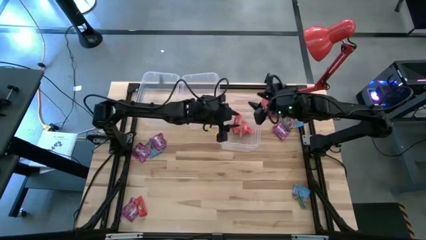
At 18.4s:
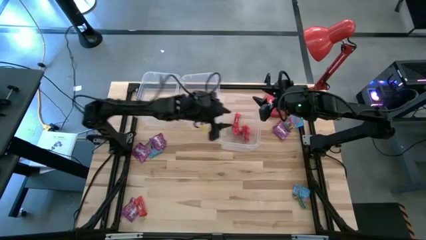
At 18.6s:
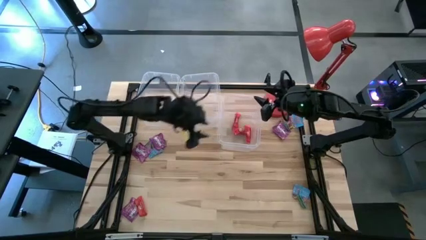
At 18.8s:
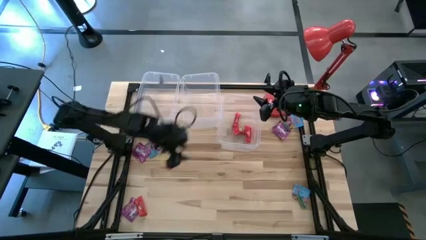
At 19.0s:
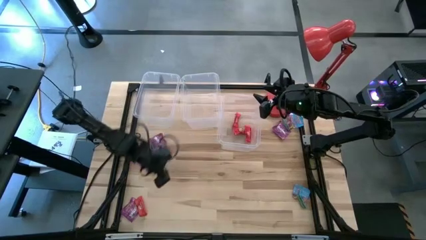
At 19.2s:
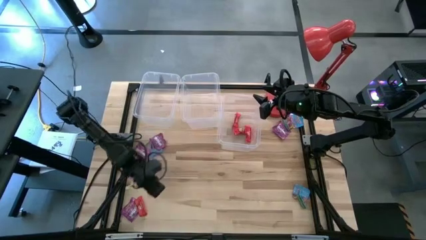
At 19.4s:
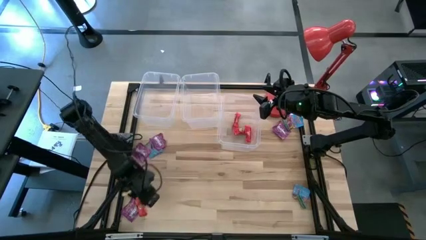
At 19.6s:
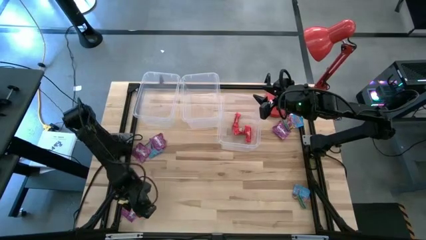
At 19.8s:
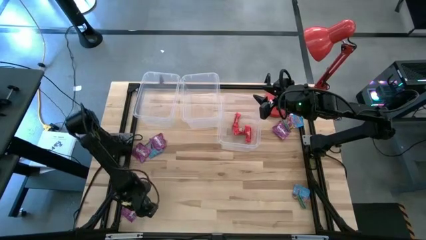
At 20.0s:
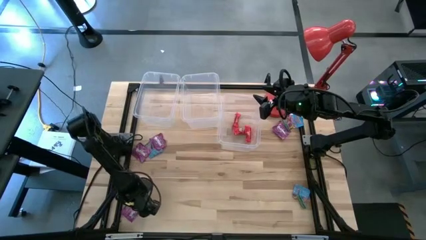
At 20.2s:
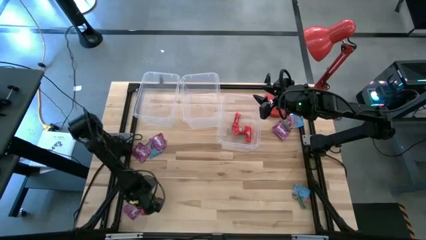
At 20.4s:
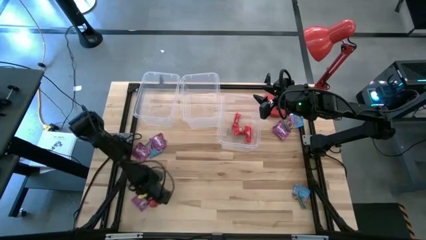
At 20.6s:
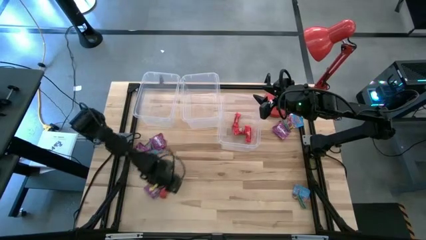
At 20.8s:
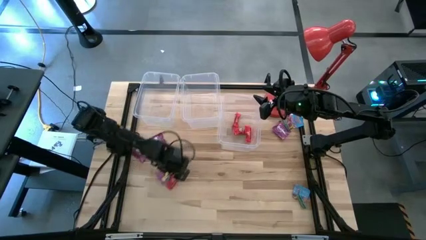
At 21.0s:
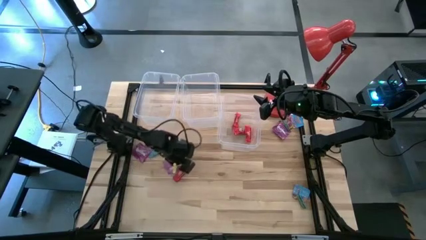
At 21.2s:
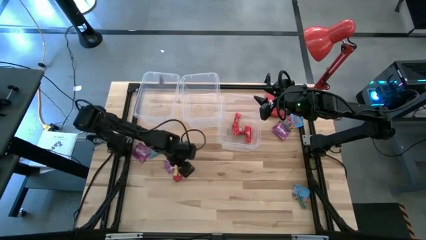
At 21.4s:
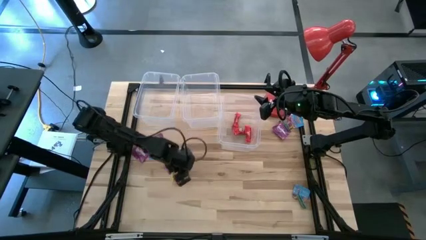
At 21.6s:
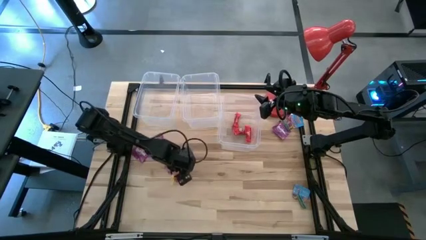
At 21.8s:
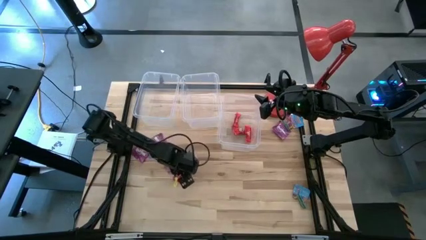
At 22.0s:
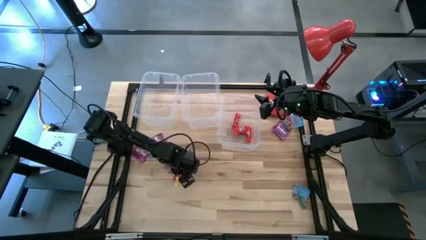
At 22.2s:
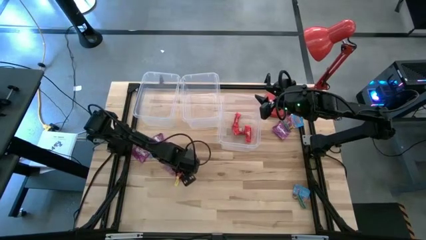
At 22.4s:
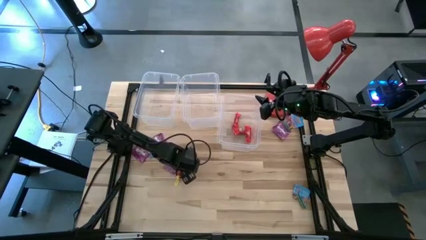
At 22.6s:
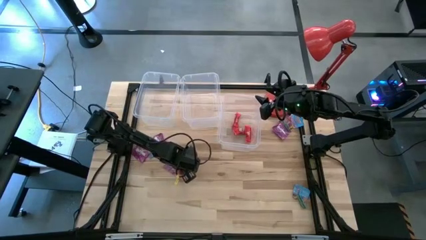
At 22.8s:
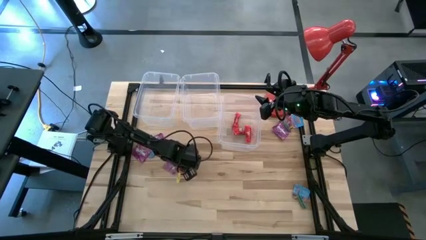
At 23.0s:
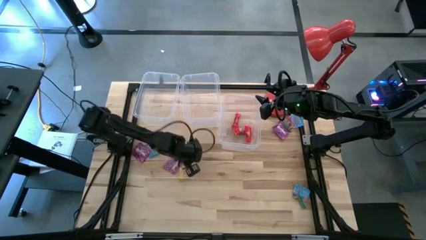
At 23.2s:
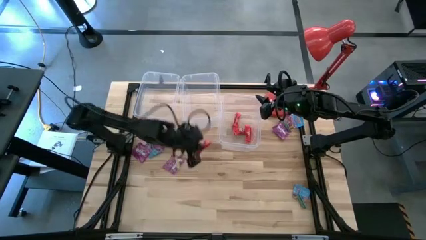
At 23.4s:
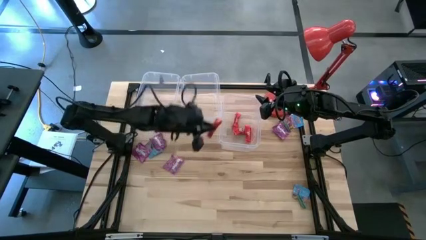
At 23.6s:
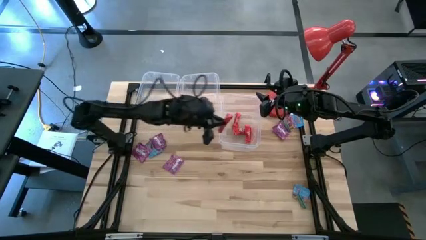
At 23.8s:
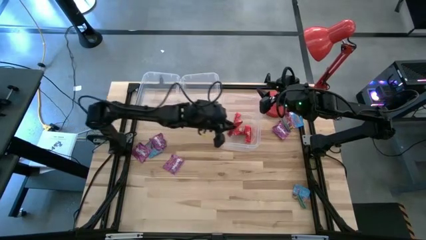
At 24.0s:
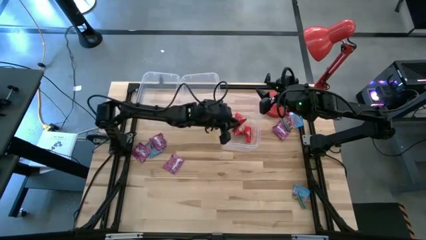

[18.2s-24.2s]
Task: Sort candy
Put the red candy into the top right transparent bin

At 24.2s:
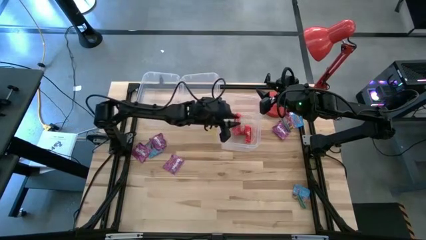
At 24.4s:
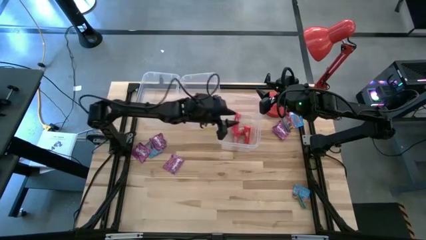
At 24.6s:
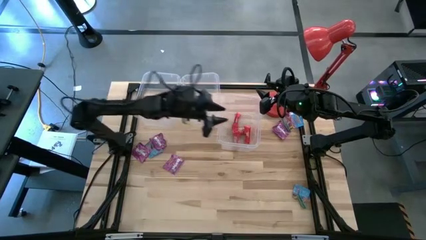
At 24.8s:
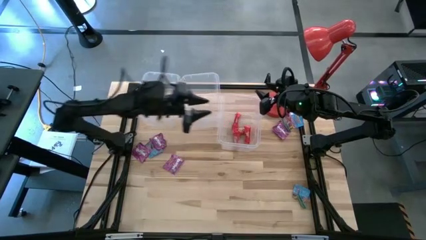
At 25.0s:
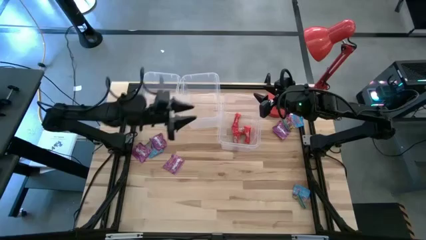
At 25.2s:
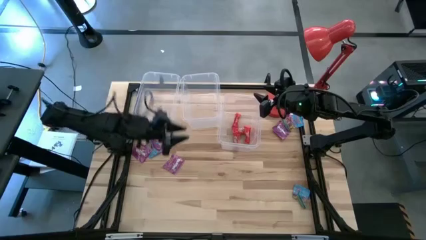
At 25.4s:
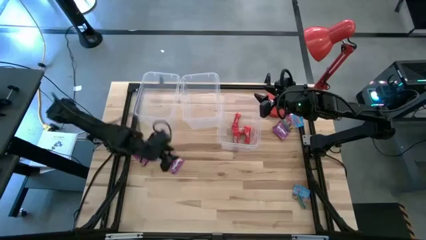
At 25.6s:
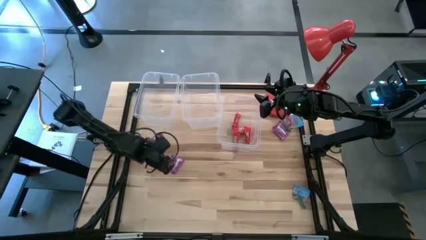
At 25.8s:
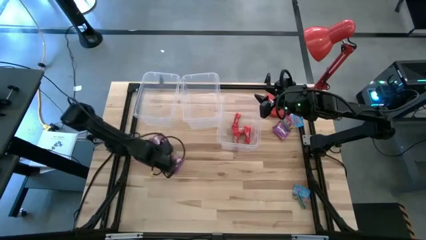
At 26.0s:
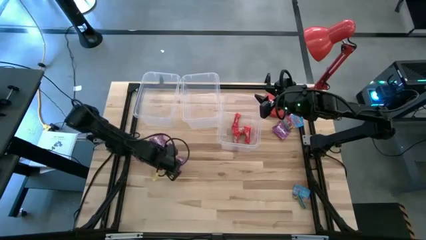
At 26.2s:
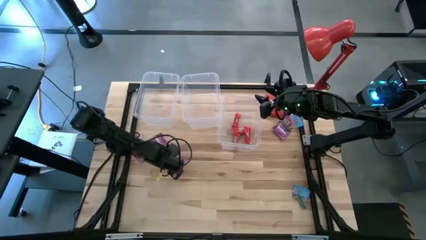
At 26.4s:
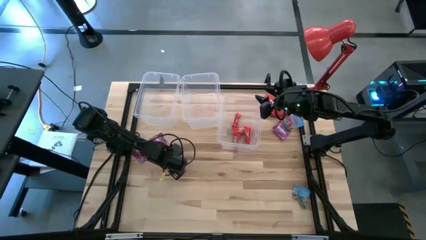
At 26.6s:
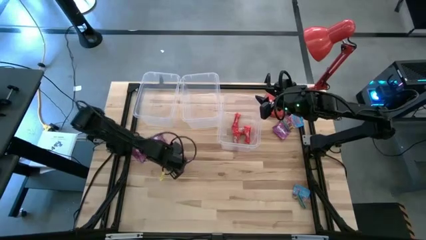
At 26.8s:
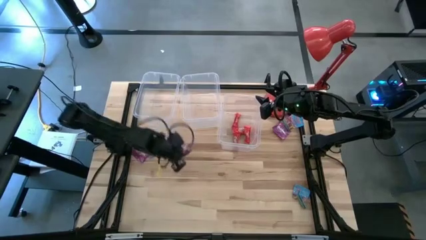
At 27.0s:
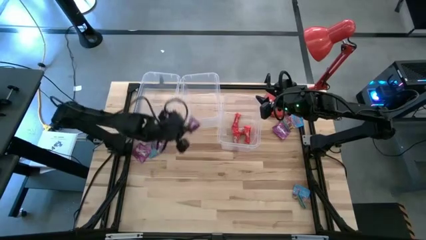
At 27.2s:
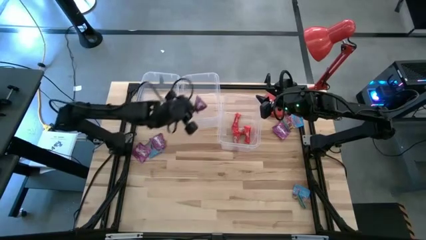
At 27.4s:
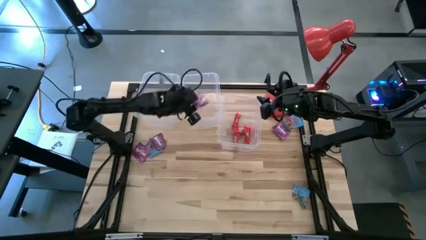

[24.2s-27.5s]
Put the bottom center violet candy into the top center transparent bin

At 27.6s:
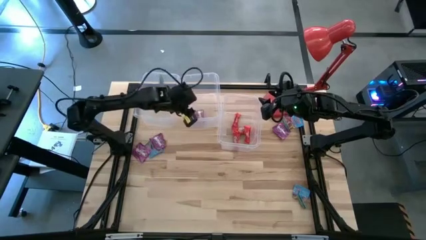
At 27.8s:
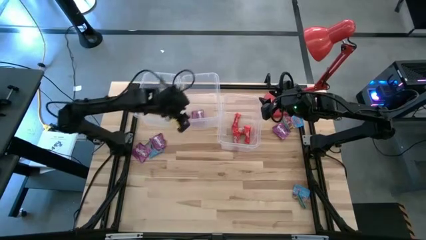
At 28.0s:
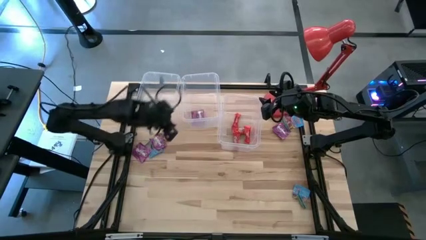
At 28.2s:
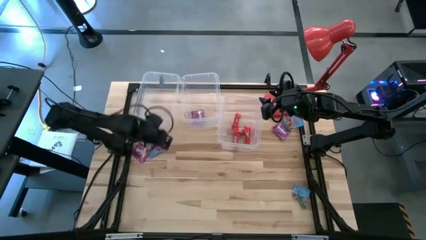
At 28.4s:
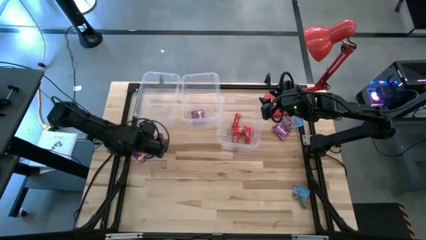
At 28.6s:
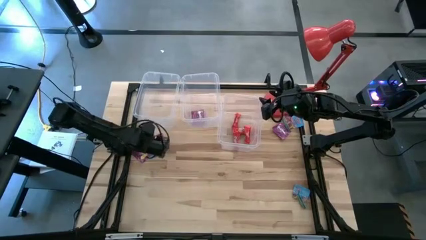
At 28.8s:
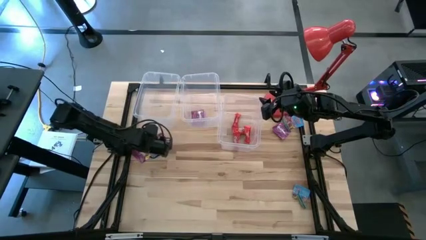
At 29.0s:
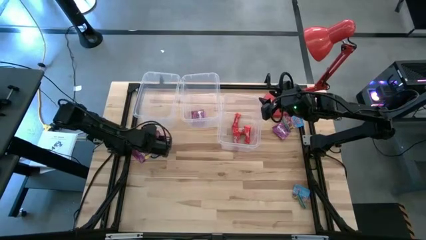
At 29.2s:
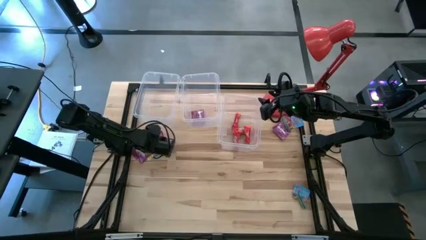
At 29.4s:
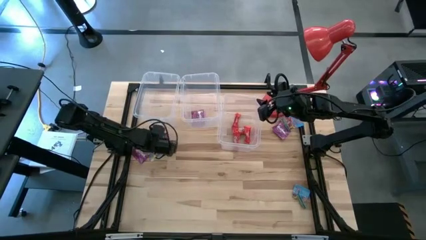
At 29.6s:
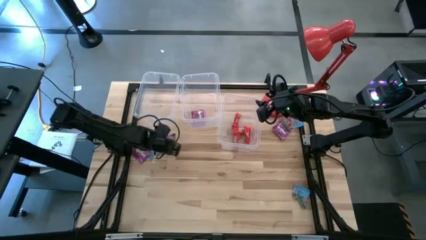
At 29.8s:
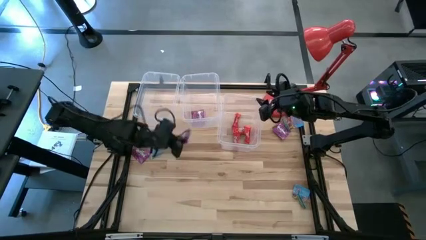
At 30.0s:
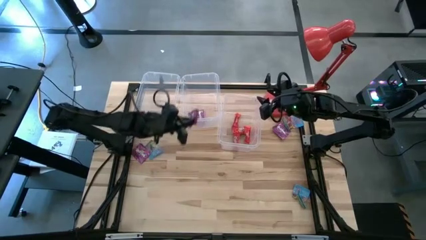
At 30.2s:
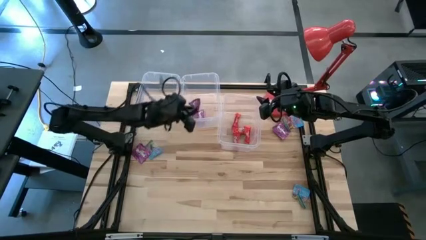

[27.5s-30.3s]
Put the center violet candy into the top center transparent bin

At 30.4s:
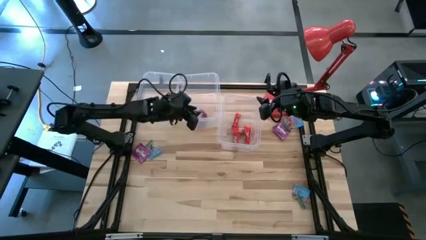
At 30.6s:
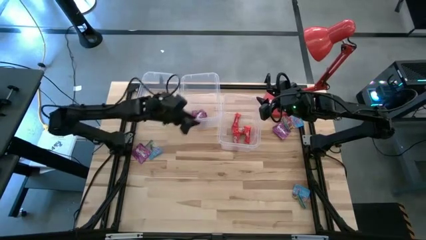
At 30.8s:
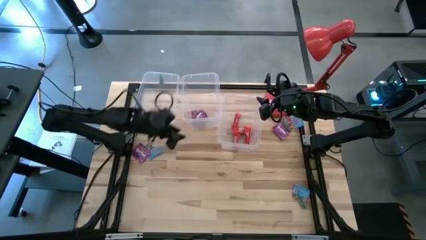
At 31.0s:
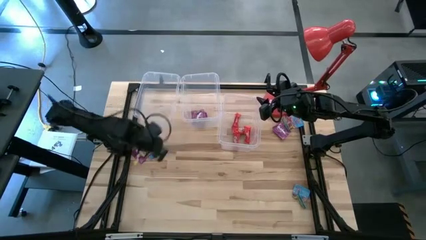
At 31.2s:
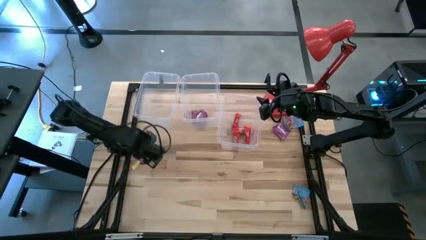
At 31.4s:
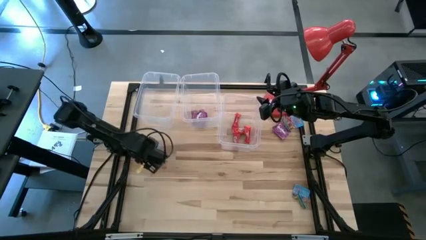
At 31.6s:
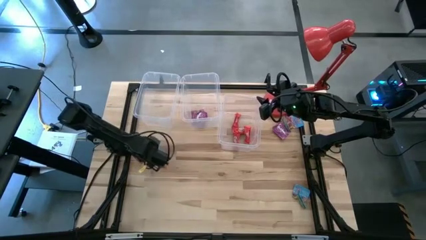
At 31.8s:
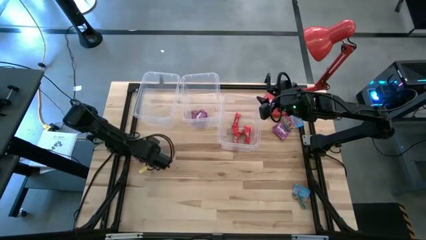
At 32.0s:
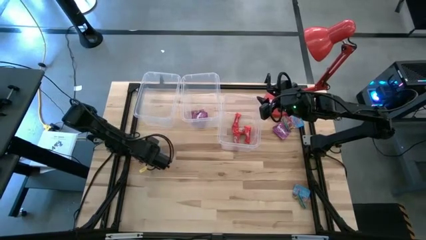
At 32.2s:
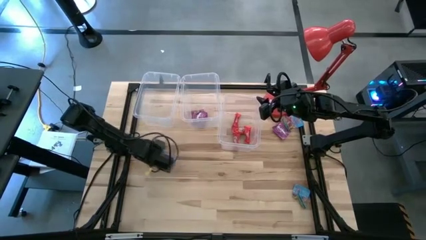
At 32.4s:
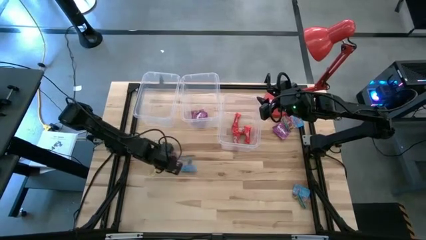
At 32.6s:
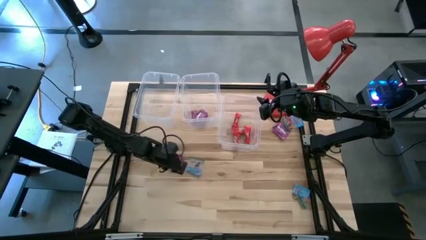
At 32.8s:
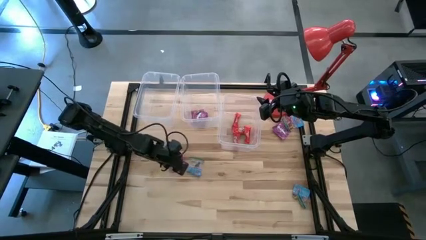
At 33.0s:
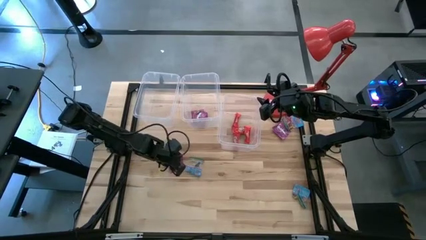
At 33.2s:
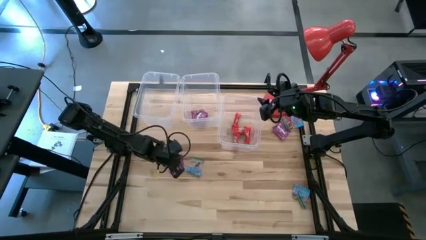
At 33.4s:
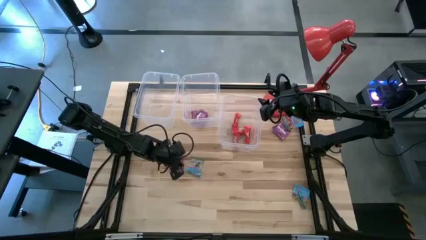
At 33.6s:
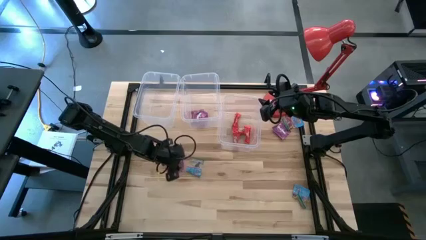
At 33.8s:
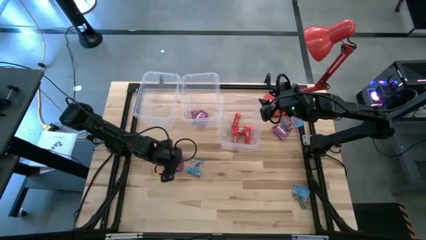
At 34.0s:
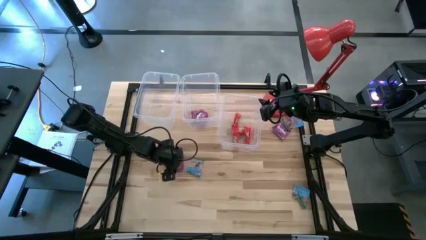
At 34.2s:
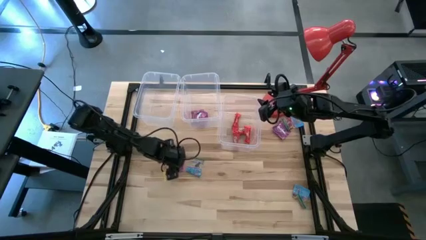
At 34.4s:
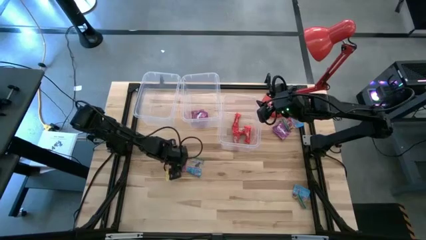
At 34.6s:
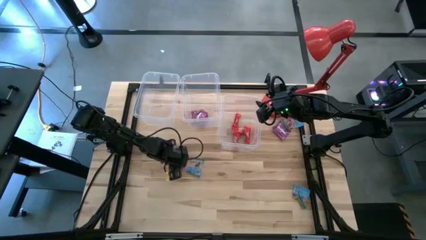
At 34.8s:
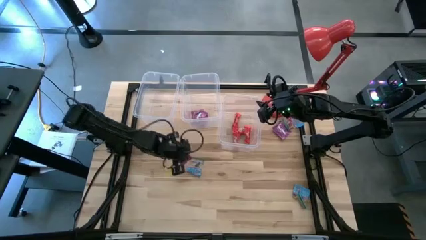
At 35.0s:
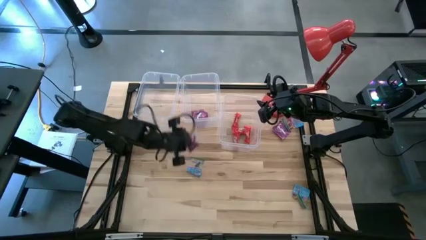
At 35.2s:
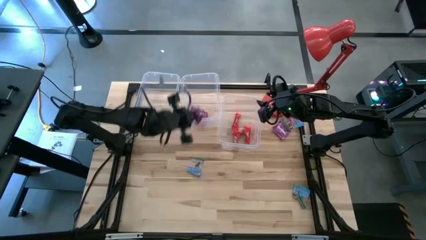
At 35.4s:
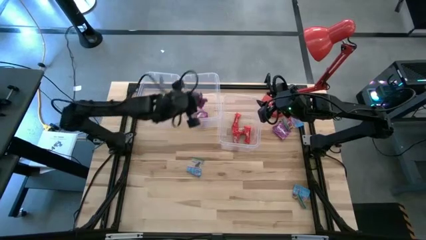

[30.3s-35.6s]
Put the left violet candy into the top center transparent bin
